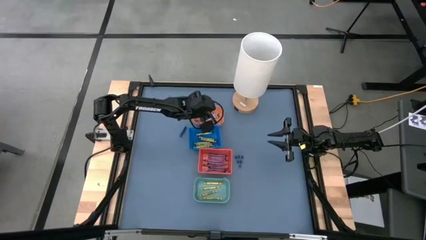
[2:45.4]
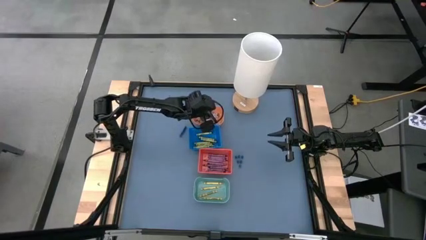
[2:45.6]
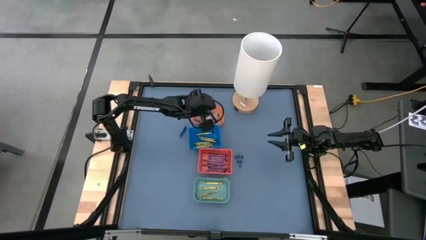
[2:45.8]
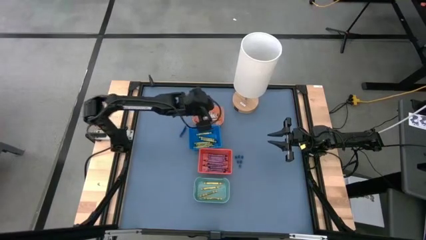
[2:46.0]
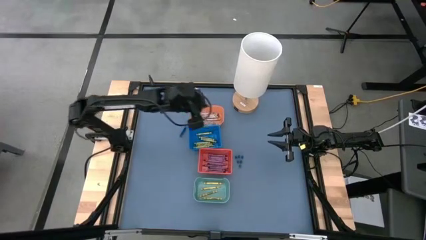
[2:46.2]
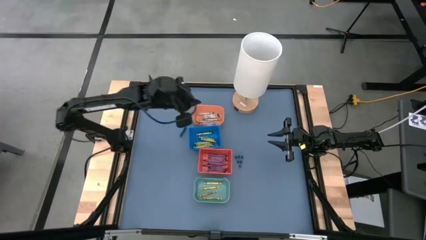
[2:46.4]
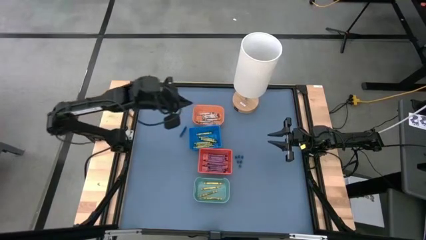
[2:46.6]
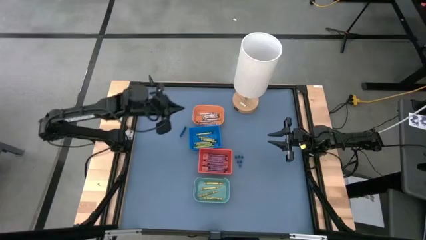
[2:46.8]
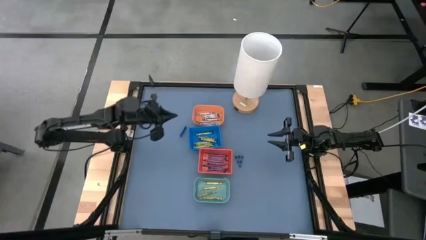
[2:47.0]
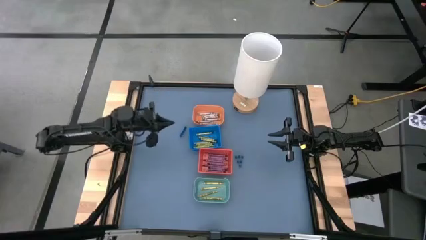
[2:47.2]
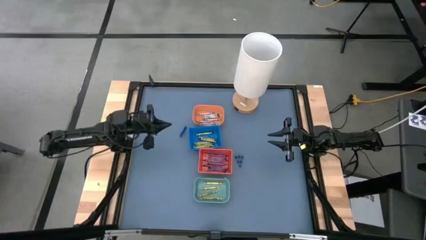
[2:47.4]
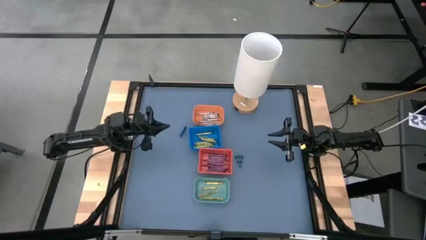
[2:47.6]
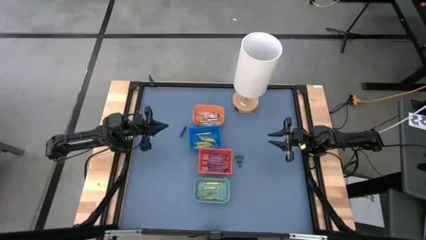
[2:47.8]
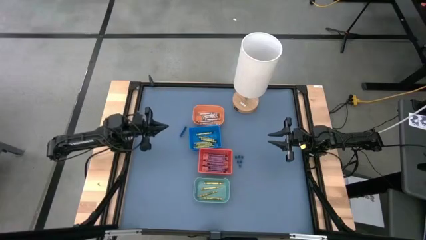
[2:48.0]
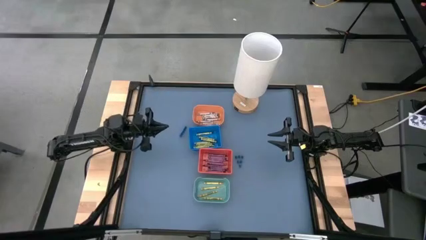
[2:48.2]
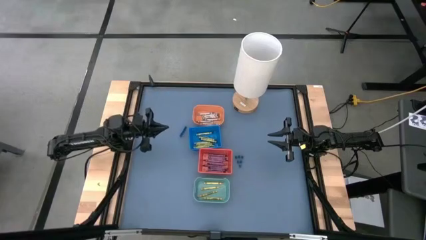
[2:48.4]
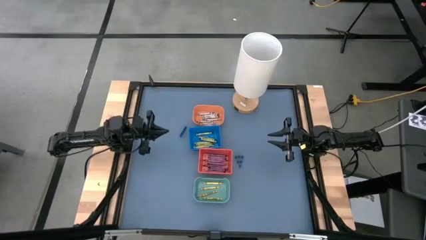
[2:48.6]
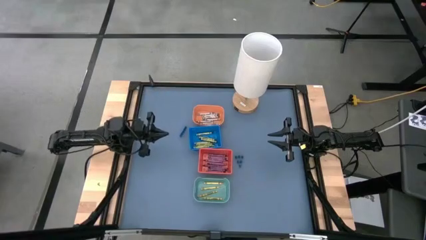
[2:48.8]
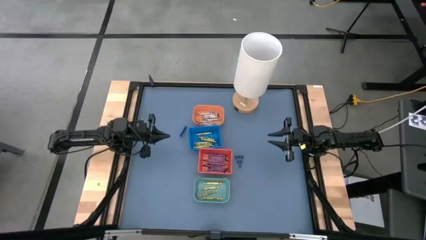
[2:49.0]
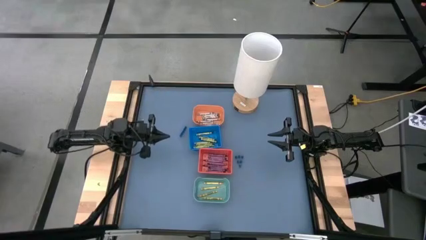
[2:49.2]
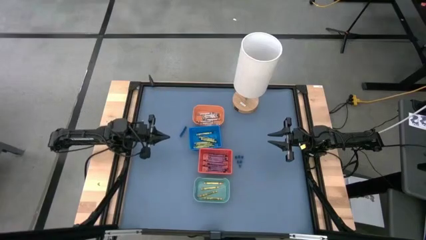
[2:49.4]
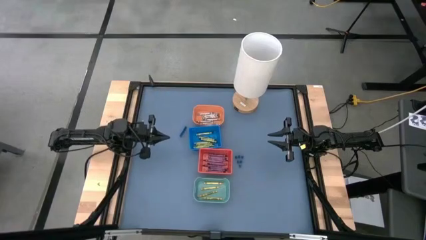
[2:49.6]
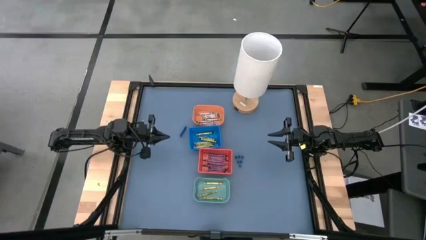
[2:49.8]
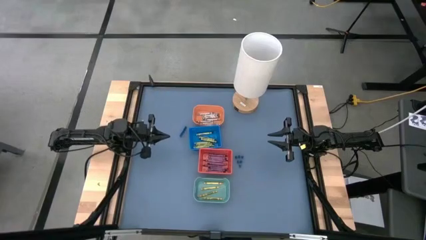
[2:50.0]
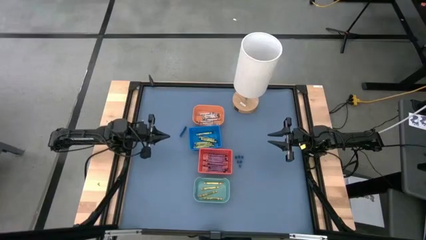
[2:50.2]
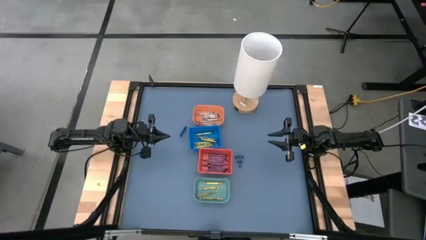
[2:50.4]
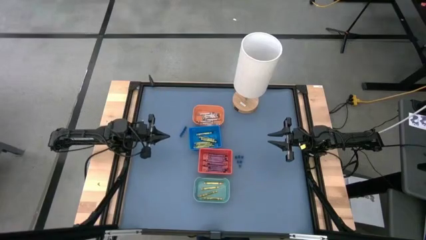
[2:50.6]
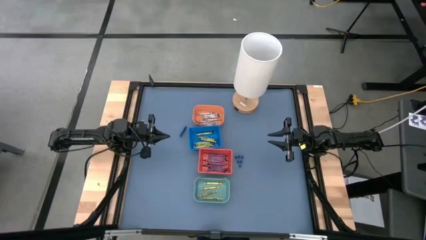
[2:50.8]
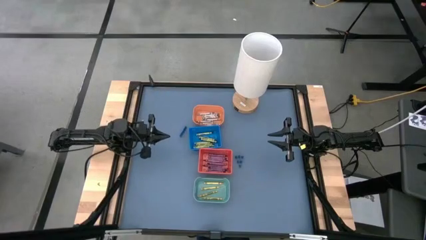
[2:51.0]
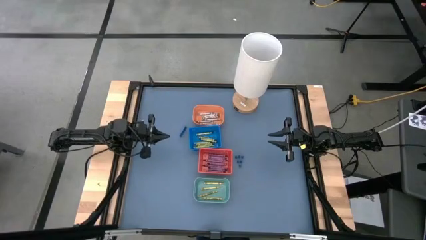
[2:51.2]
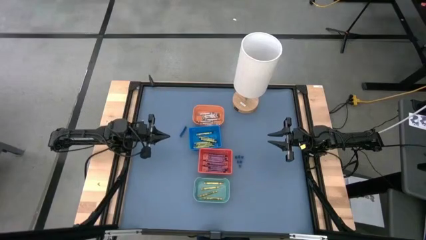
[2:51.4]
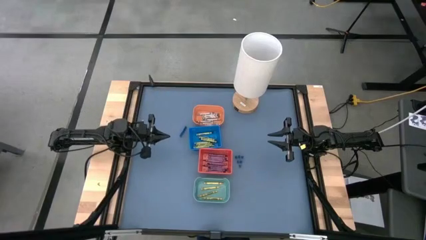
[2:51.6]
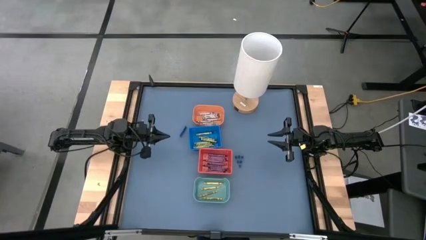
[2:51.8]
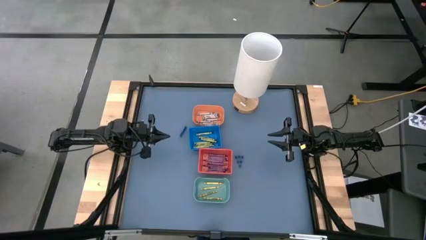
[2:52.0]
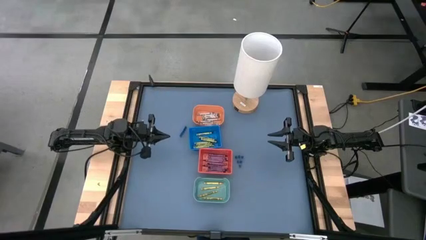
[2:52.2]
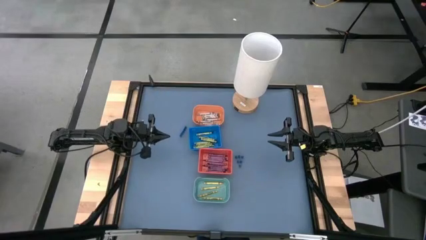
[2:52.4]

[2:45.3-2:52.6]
Task: Sort crayons
Return to Home Position

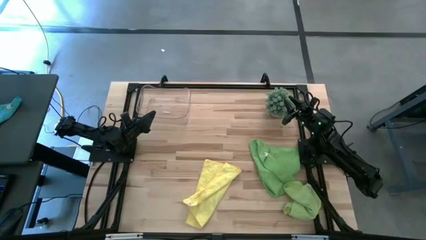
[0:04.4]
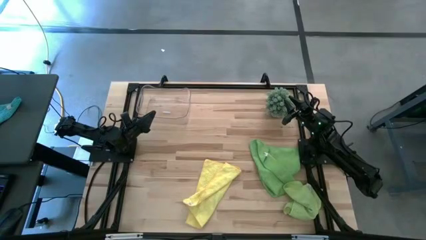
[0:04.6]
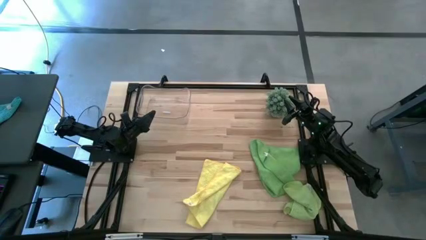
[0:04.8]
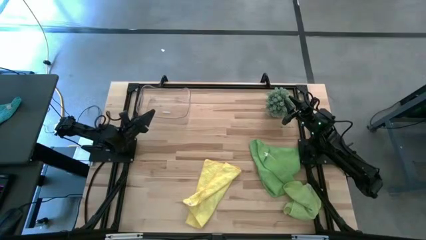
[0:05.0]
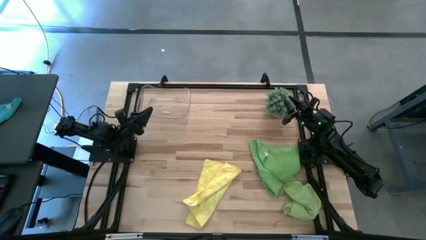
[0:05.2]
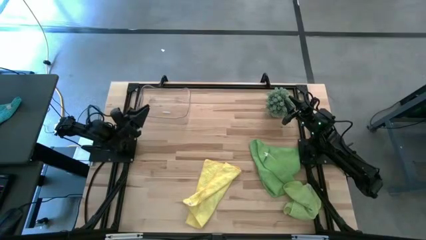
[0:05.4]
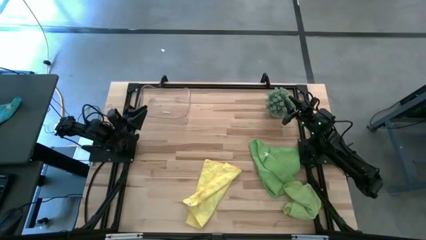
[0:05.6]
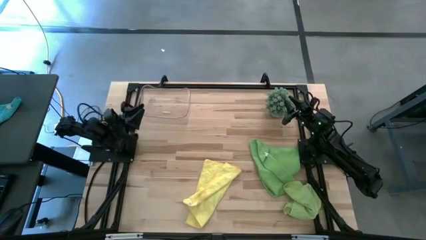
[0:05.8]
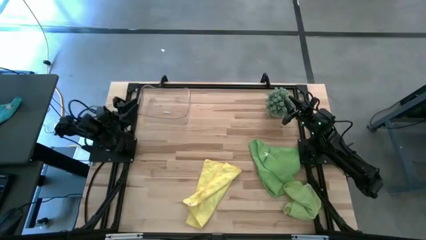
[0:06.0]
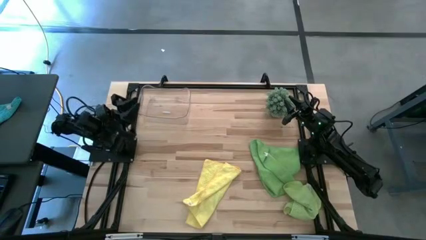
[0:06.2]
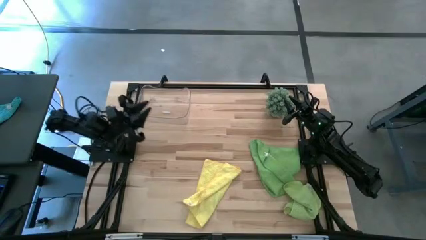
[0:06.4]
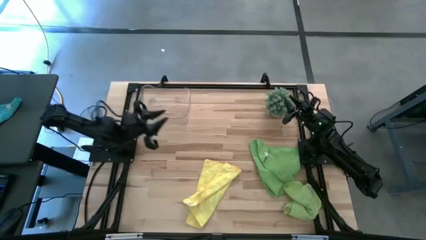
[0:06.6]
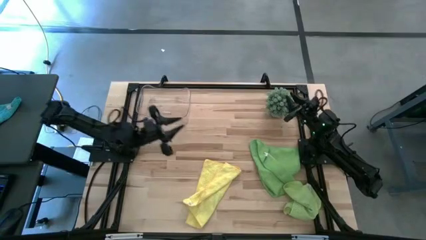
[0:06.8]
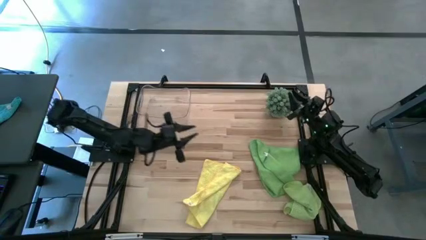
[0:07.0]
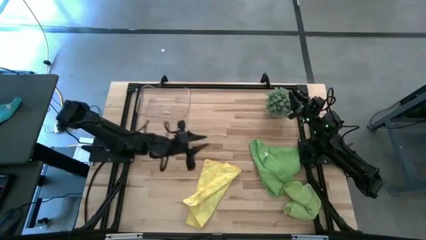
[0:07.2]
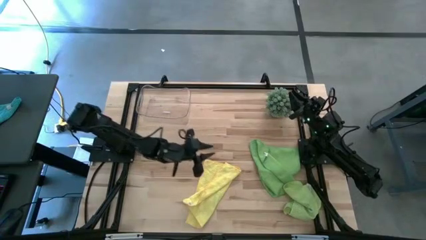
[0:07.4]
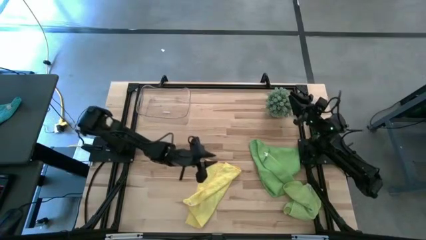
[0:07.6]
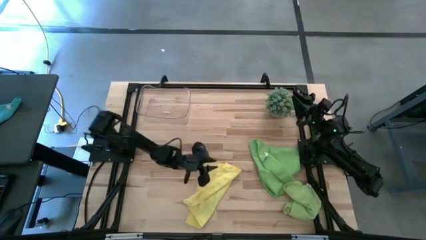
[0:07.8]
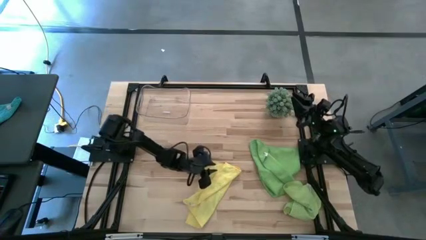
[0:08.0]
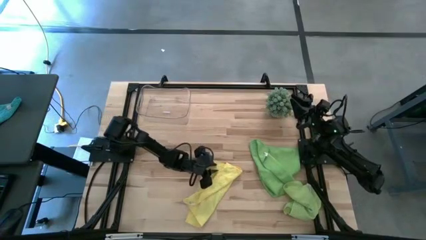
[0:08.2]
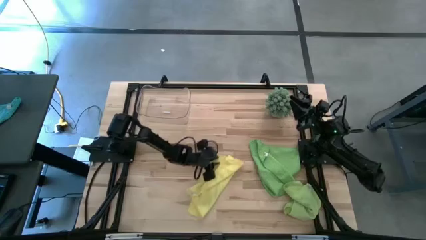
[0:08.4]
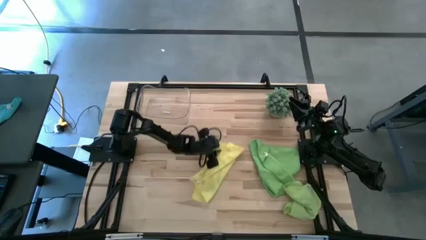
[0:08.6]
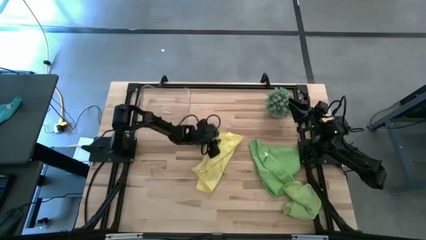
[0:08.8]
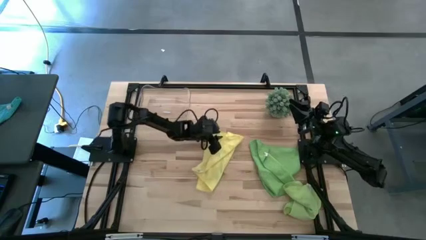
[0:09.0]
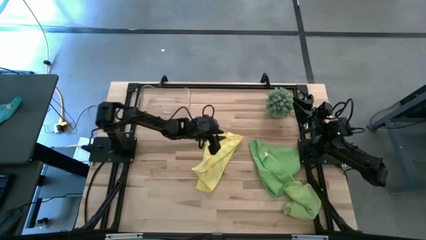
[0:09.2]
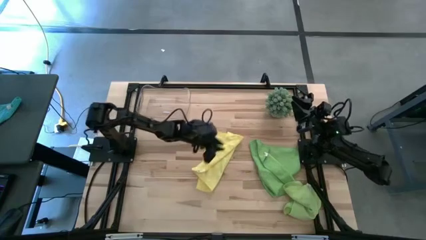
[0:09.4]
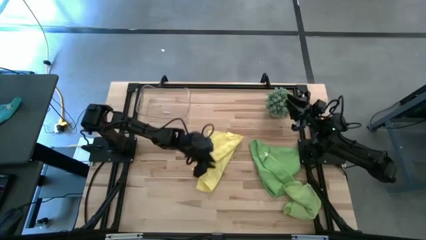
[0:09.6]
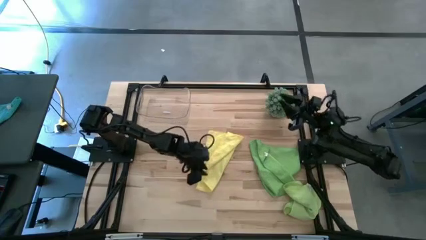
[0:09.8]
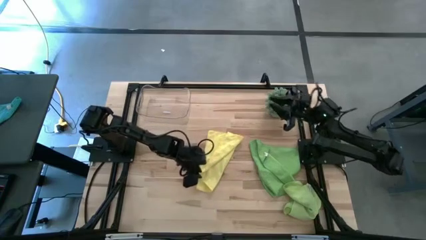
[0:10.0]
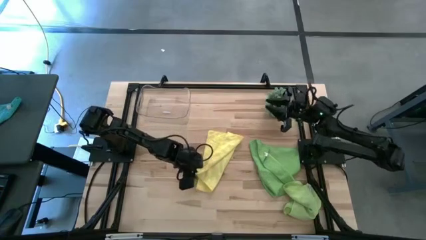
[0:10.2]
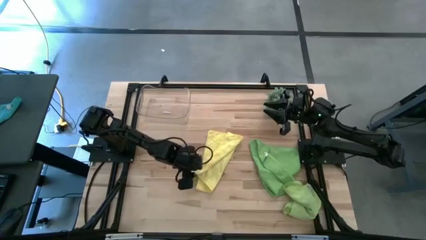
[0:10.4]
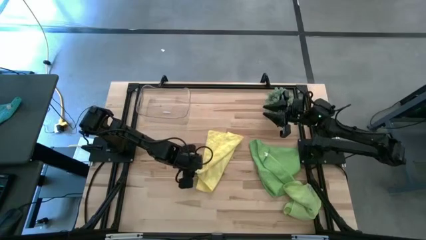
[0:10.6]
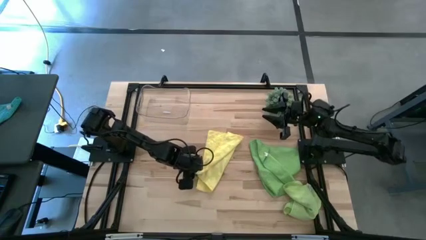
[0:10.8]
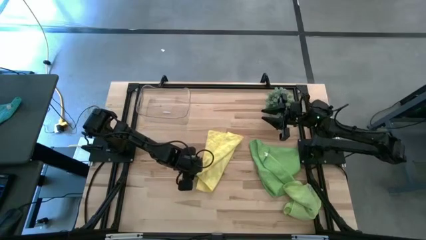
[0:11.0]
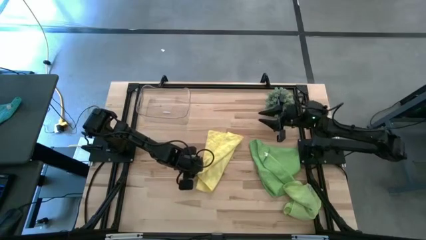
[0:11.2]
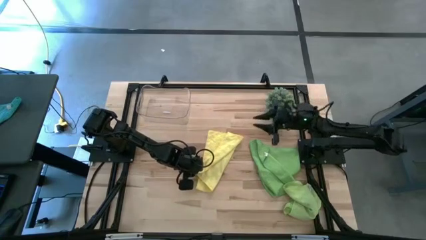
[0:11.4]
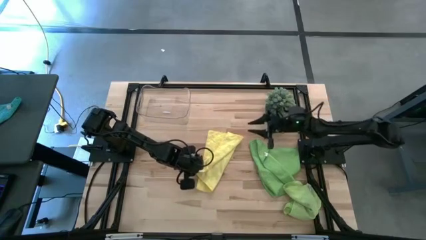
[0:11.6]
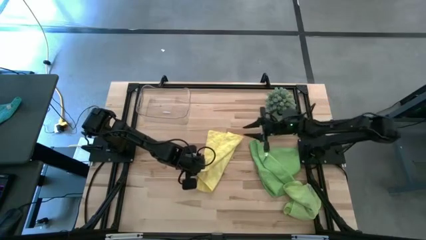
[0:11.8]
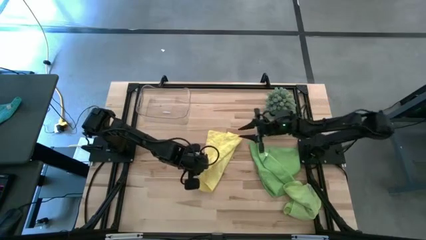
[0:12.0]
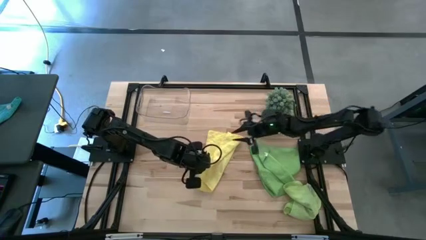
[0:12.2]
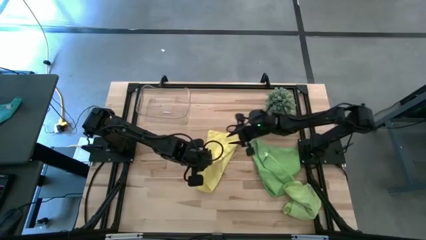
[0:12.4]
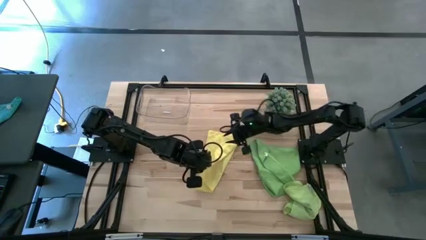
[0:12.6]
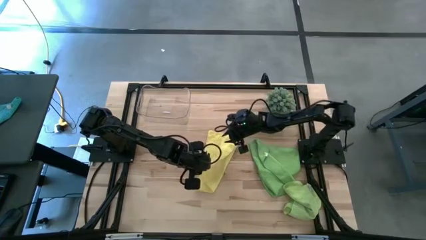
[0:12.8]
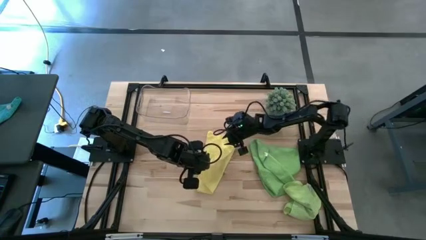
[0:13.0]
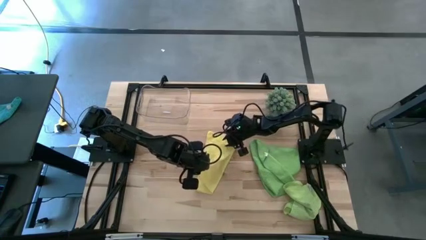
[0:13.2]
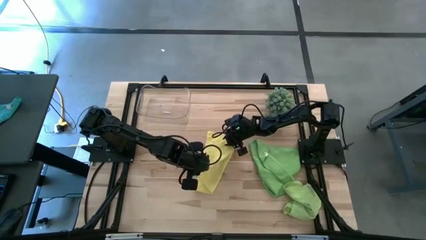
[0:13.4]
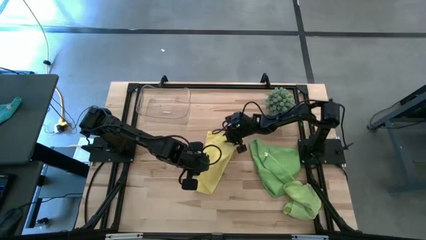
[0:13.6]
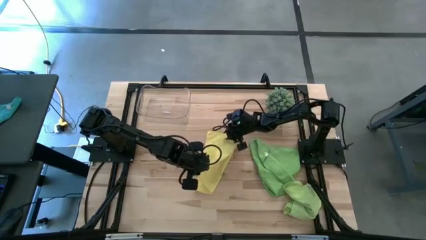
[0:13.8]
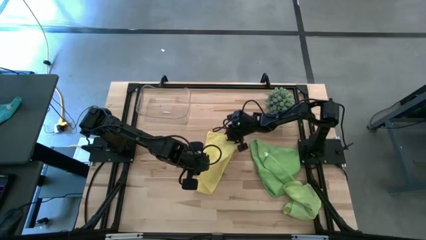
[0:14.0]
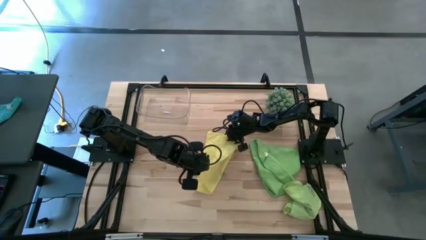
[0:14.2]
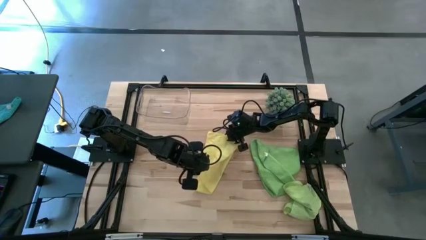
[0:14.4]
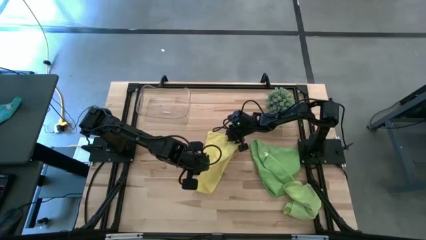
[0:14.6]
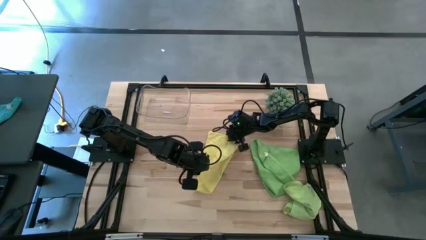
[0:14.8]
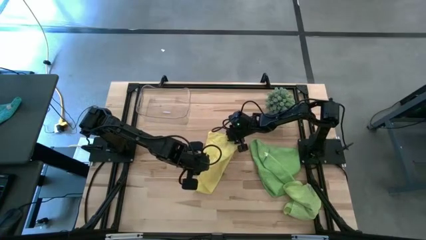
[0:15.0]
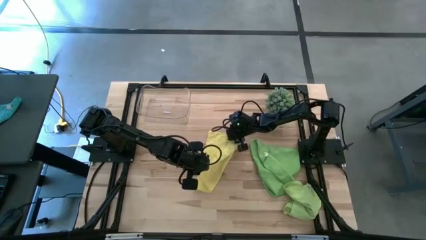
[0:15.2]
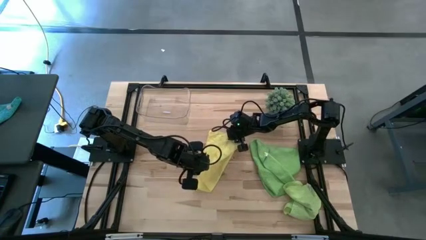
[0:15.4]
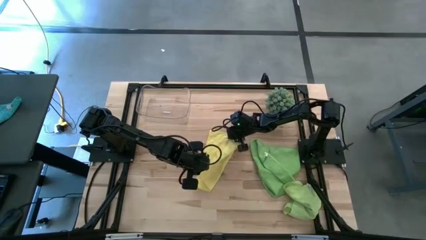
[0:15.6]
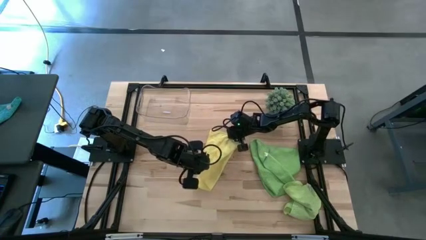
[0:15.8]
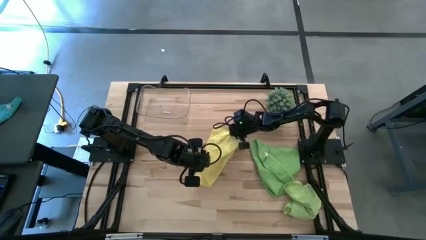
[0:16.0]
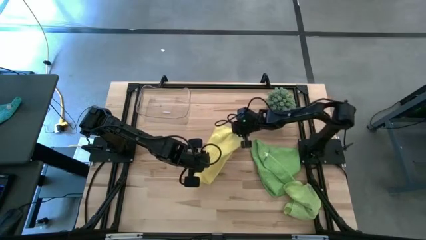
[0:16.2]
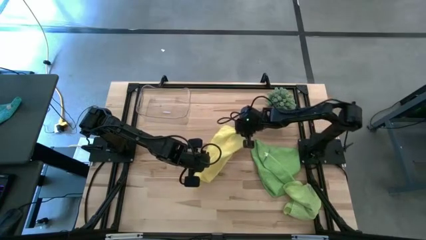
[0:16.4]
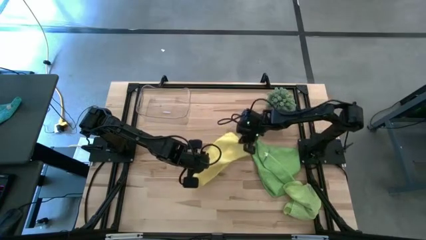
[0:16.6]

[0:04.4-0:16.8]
Task: Roll microfiber towels into tight, uniform cylinder then place into a basket
Fold the yellow microfiber cloth
